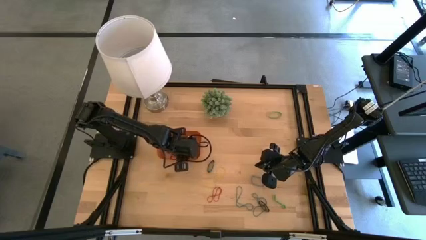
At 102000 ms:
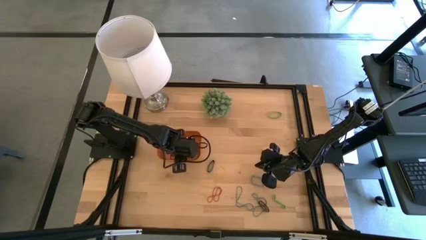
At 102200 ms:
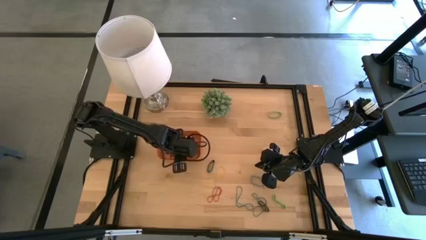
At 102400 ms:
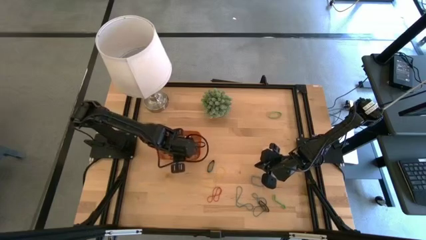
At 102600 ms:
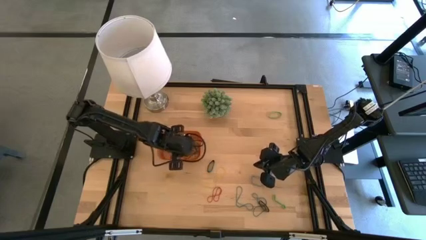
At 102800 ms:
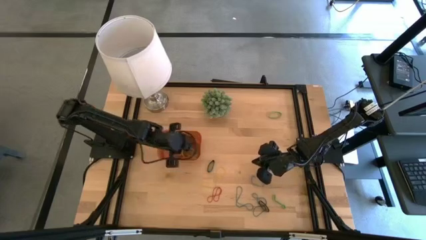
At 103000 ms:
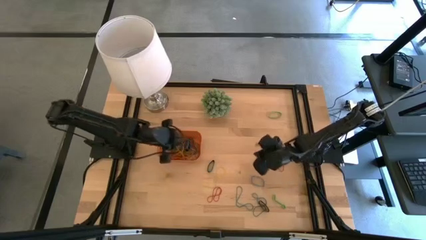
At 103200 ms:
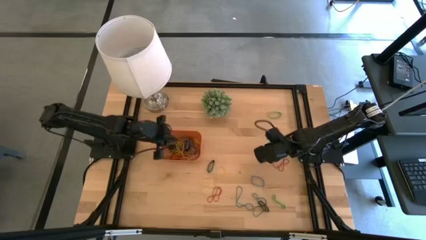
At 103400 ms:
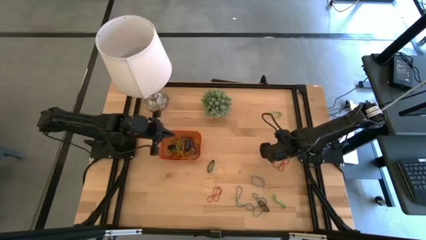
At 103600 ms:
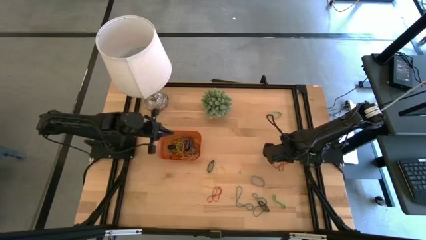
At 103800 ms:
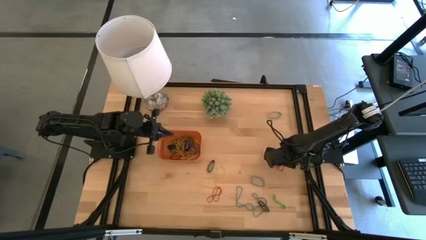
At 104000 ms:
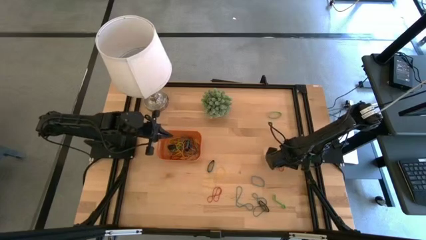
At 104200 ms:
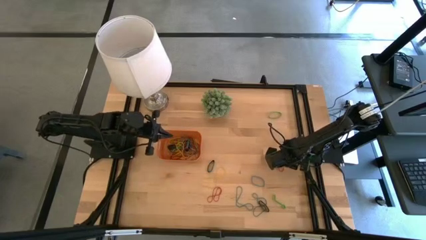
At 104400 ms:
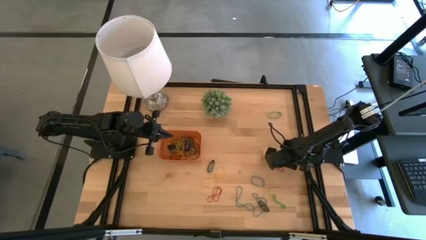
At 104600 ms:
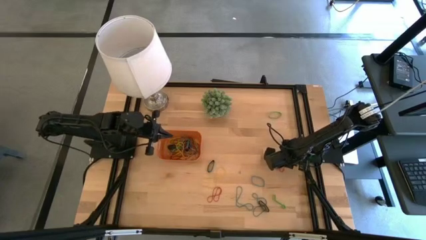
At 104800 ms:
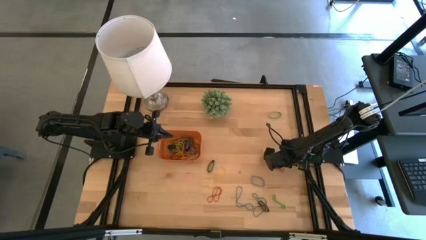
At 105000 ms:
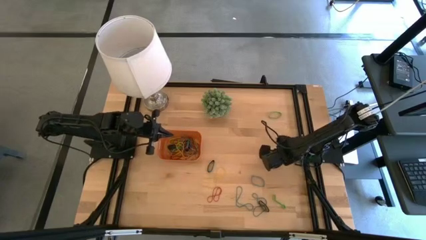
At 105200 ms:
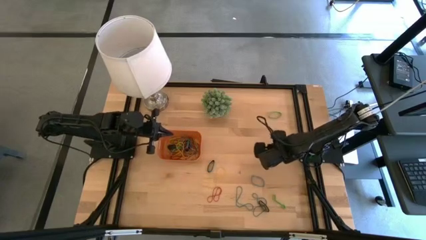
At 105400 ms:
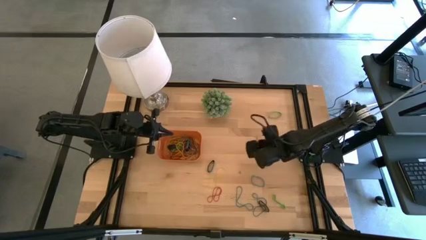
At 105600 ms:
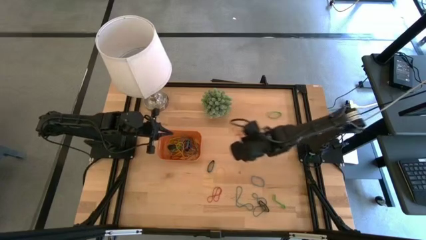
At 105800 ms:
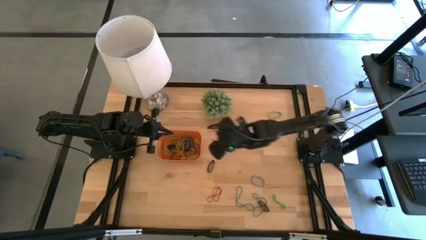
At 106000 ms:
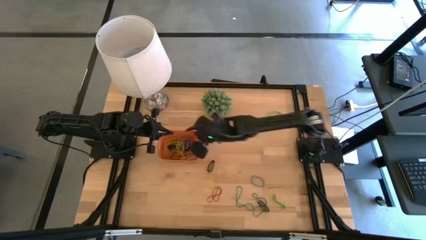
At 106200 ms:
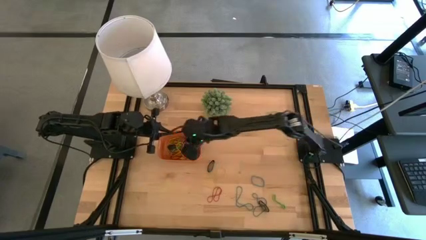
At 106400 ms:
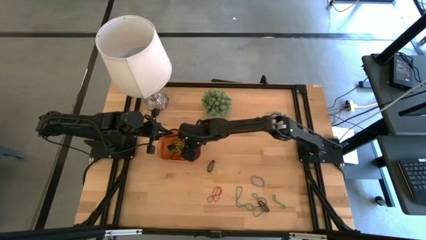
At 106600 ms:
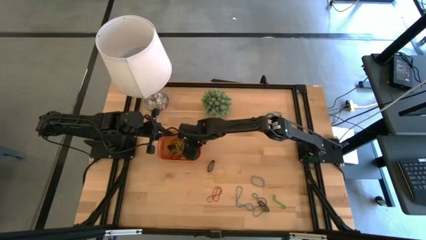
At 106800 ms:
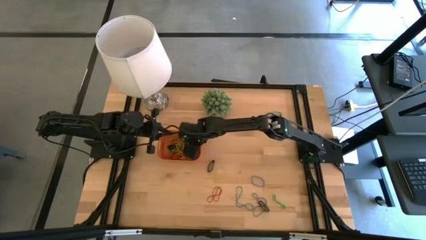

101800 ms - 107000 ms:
Task: Pick and place rubber bands into bin
Put the red rubber band into the orange bin

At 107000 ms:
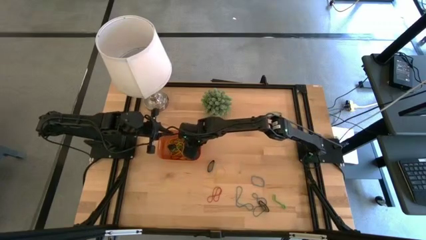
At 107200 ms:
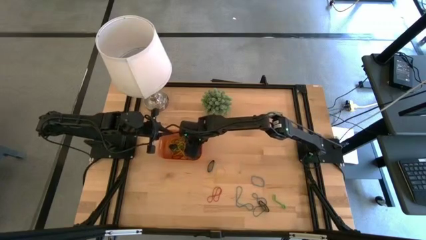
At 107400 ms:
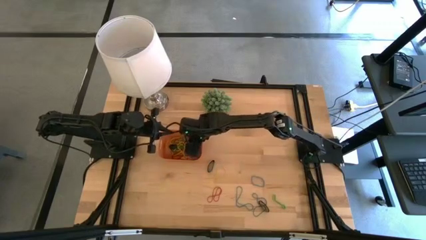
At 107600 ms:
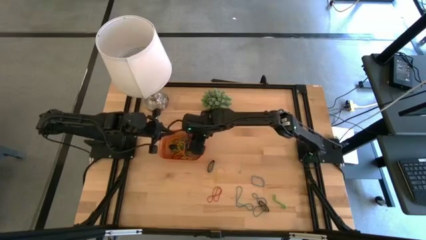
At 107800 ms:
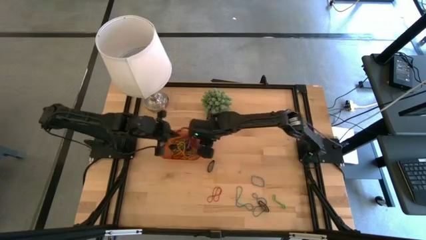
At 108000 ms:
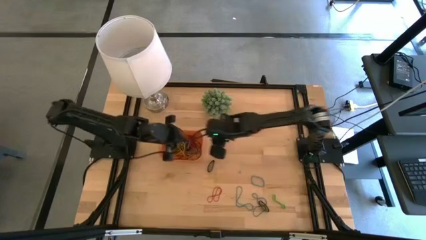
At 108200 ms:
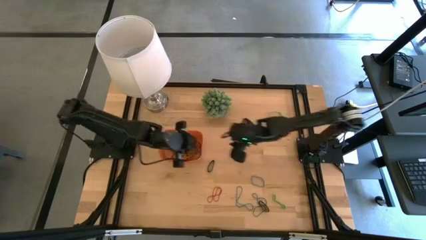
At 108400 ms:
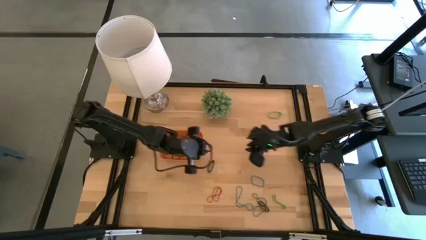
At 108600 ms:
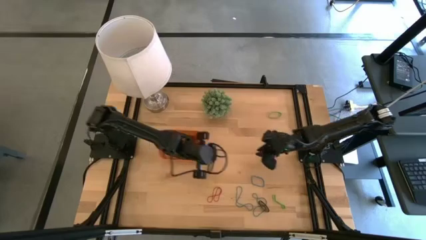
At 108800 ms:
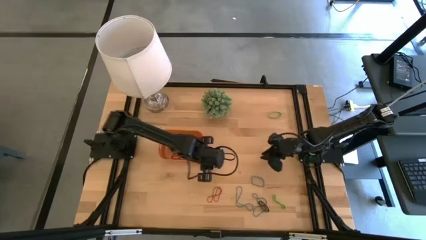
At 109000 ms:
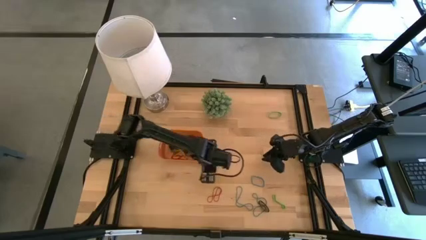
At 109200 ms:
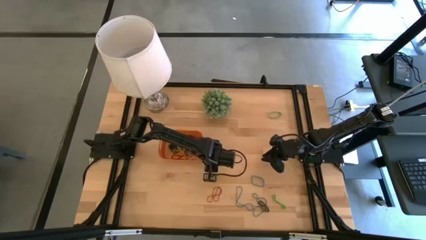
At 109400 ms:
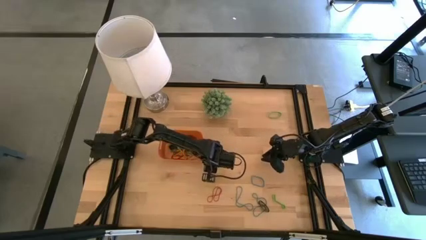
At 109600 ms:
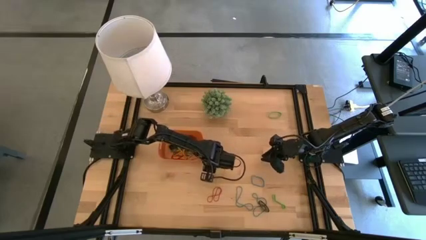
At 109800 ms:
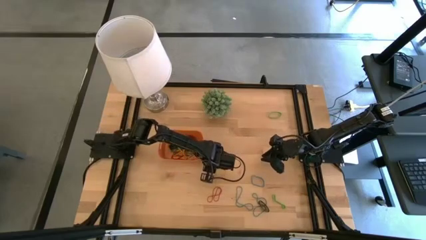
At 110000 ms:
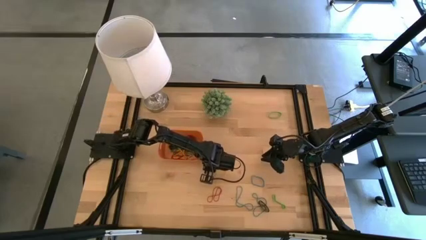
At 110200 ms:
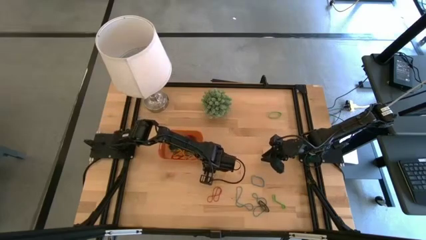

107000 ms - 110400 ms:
Put the black rubber band into the orange bin

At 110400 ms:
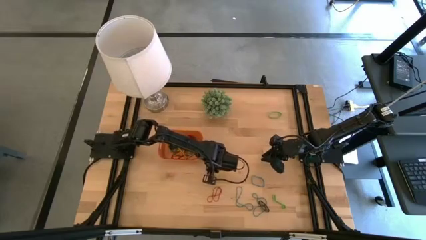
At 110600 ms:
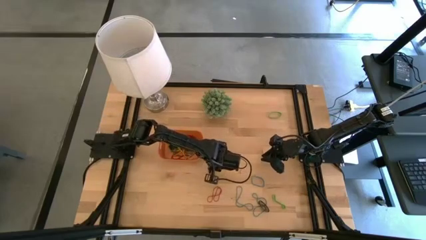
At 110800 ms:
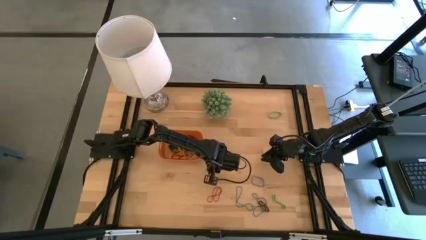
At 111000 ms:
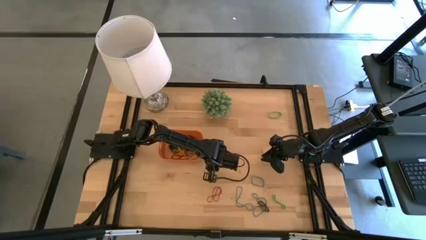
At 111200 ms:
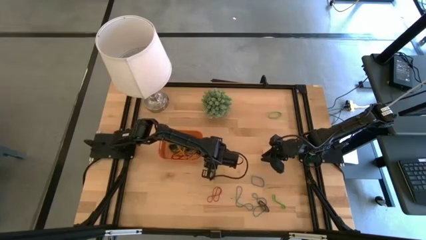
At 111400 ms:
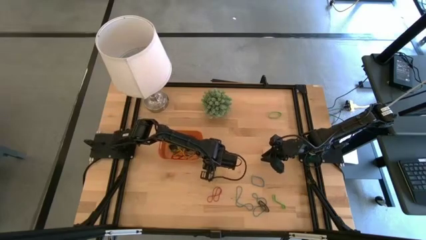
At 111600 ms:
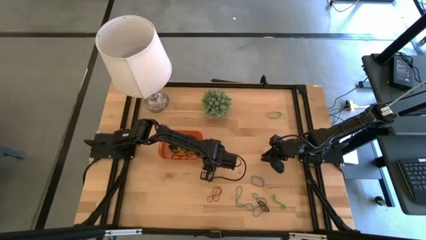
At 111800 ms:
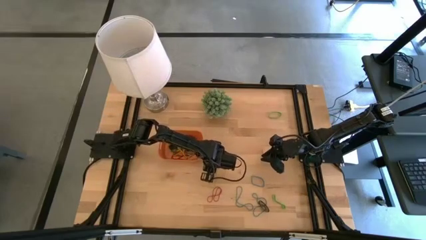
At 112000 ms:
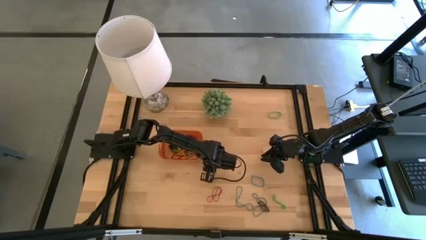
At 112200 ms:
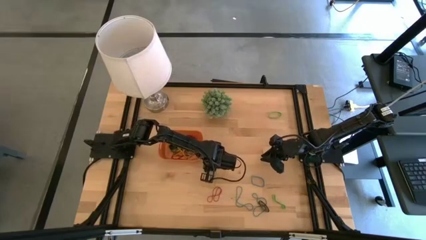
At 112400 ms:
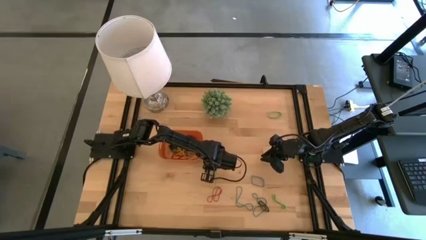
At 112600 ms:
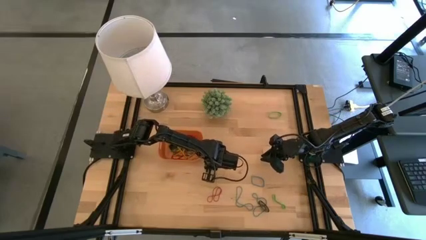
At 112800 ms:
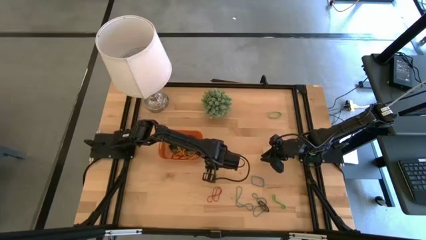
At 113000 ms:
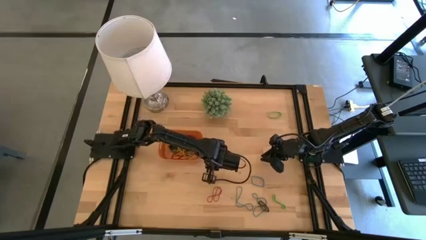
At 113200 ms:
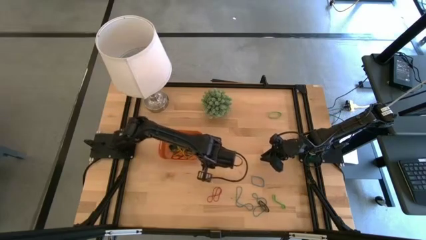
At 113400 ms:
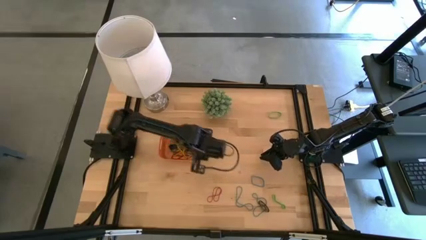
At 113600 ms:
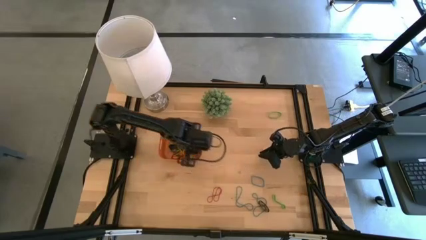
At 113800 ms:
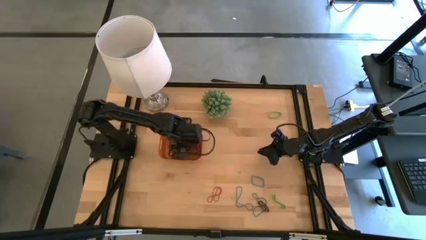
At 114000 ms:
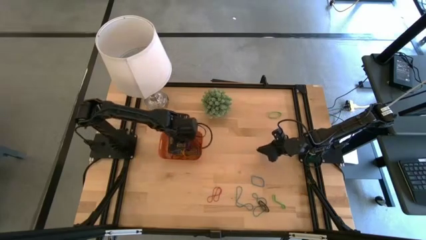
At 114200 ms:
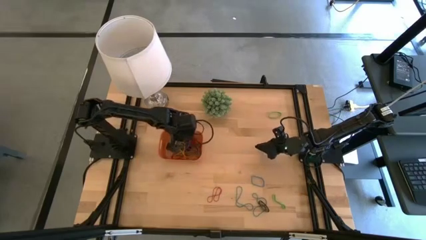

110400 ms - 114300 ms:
Put the black rubber band into the orange bin

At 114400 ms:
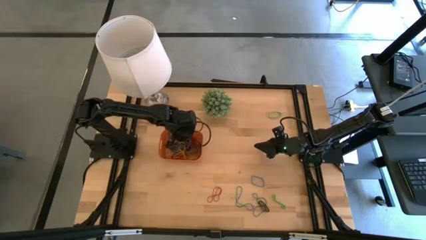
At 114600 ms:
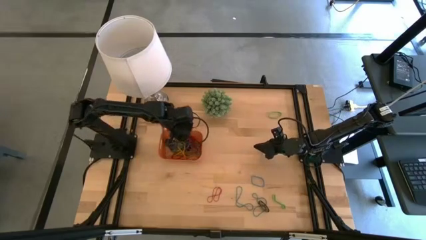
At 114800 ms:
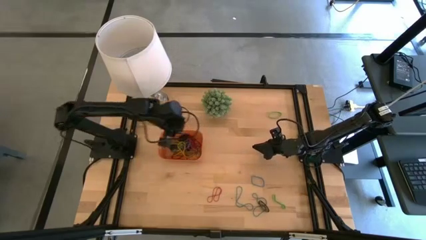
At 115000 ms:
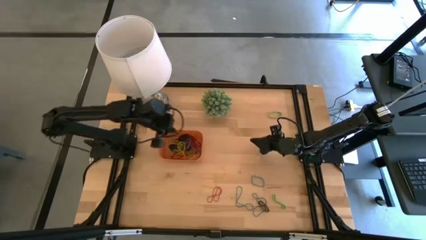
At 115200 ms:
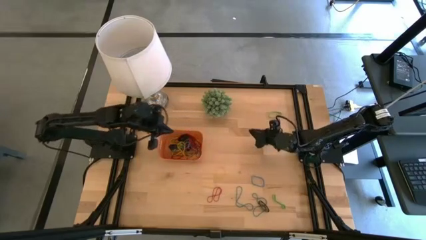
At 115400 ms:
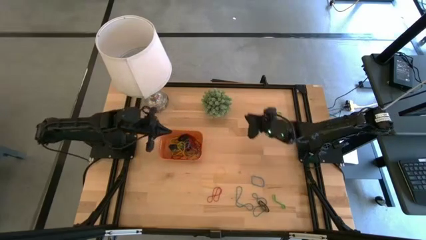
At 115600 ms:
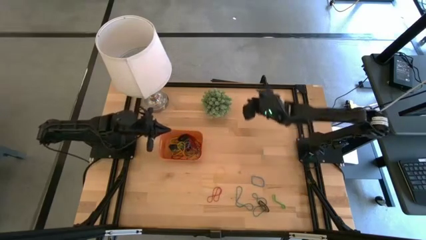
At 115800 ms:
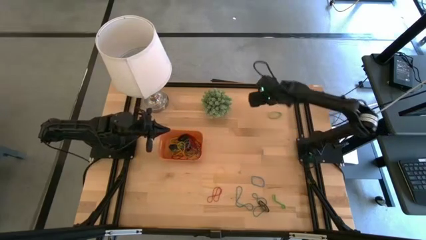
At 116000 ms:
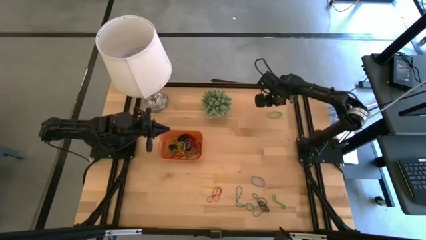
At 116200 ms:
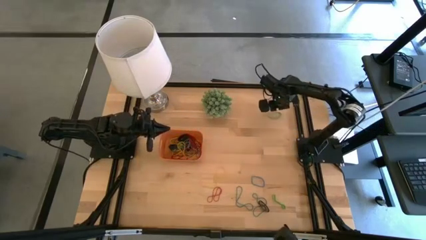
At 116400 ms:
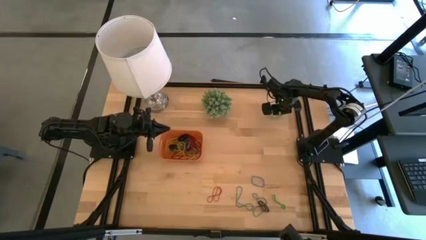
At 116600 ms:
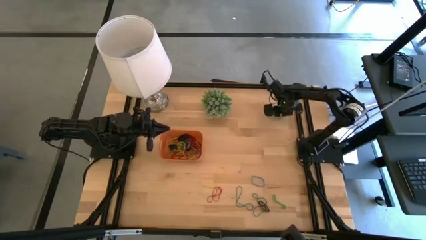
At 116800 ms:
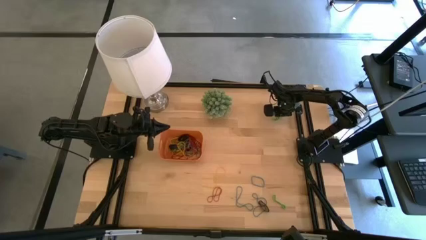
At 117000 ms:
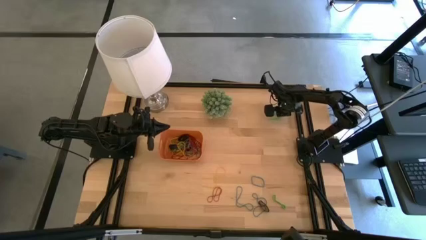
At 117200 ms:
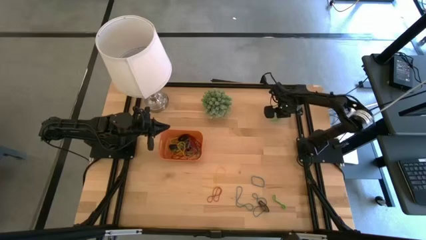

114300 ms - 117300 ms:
Put the green rubber band into the orange bin

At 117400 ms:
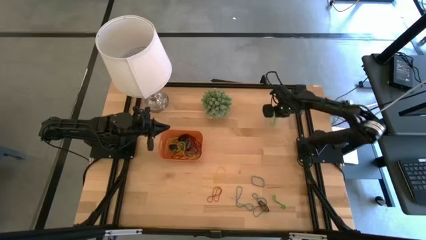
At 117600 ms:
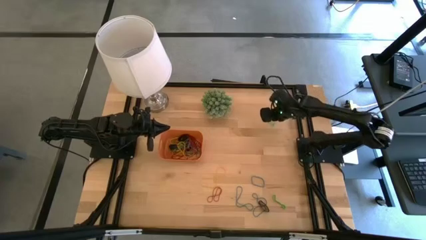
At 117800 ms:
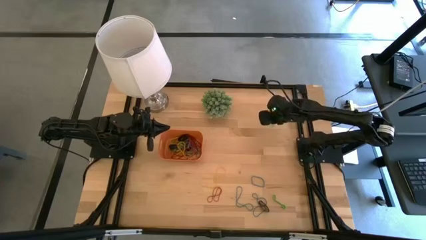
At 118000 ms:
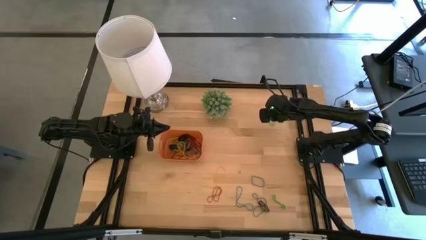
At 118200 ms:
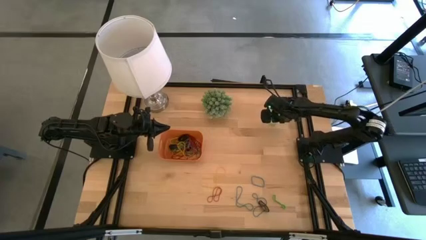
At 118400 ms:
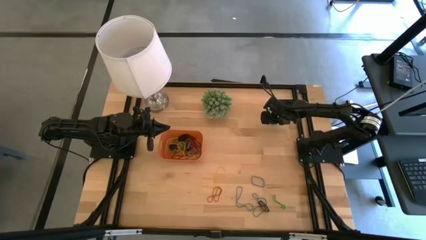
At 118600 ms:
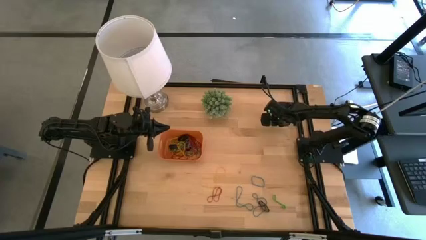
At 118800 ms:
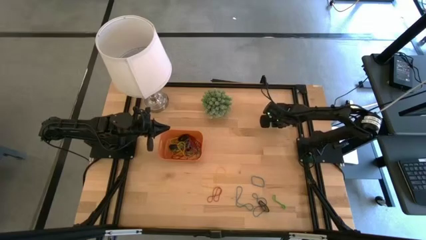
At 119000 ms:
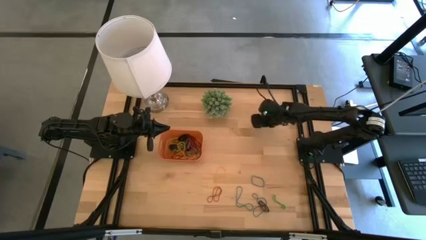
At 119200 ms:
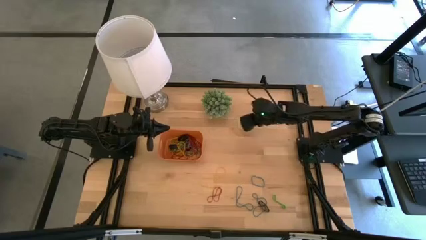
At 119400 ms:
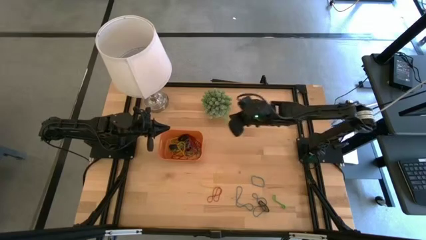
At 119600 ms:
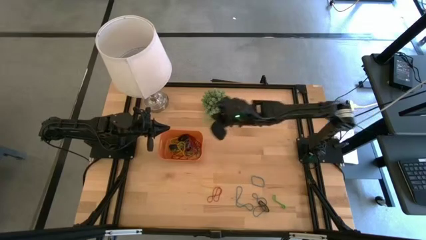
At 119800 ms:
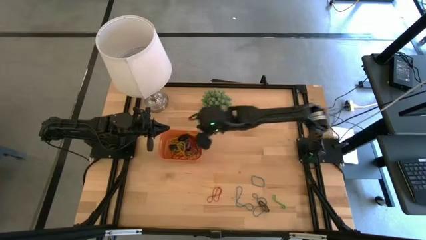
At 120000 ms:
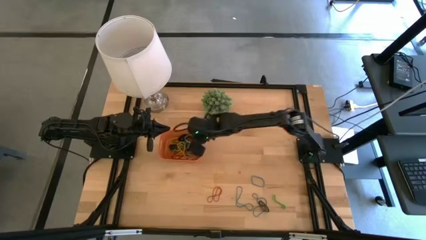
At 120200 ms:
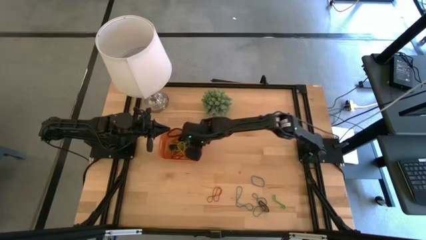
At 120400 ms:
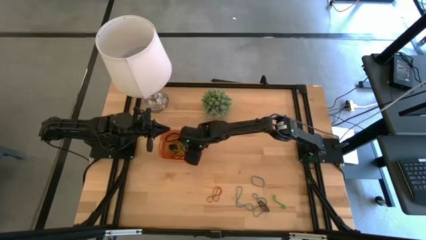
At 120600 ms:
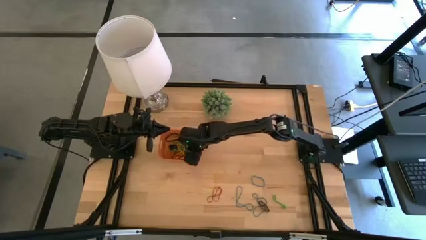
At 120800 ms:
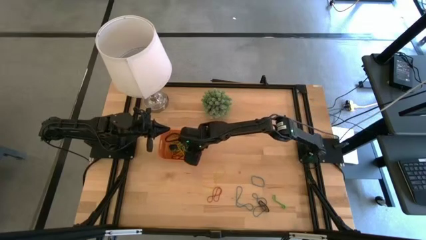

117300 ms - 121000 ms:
Put the green rubber band into the orange bin
